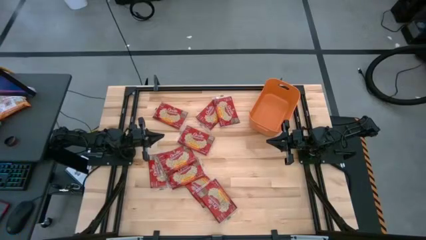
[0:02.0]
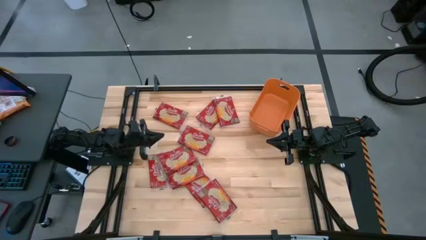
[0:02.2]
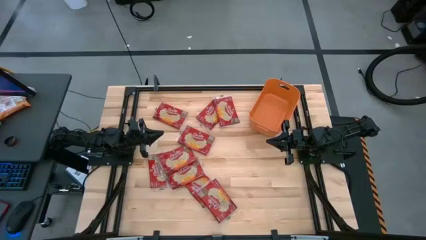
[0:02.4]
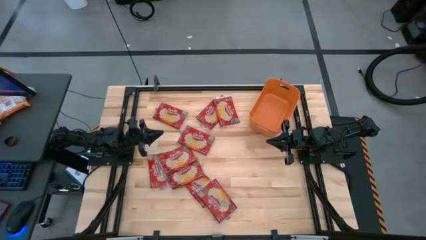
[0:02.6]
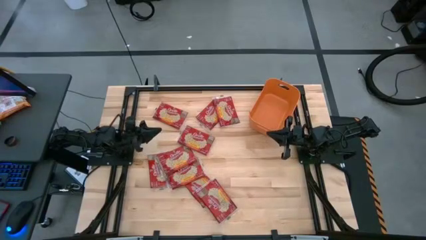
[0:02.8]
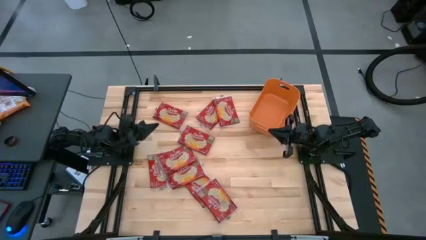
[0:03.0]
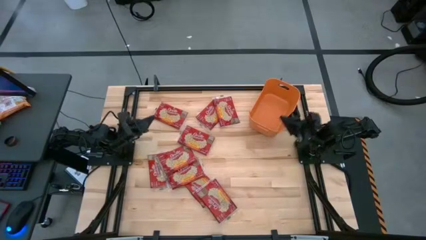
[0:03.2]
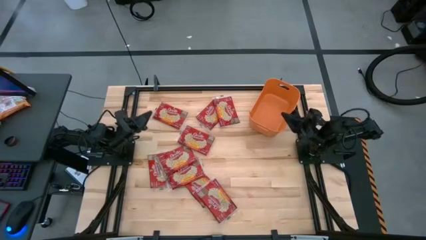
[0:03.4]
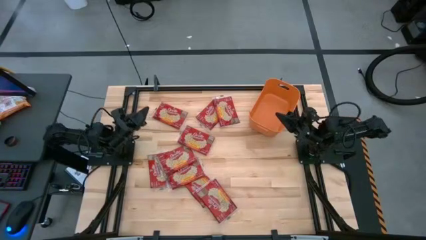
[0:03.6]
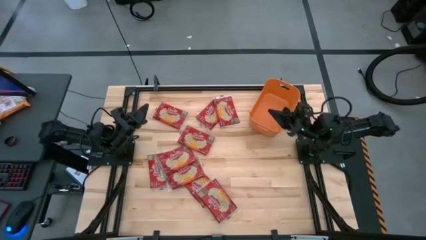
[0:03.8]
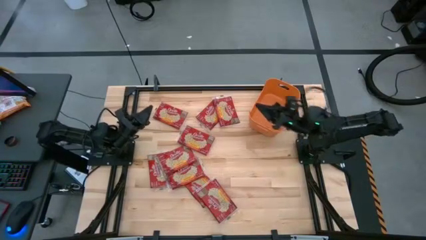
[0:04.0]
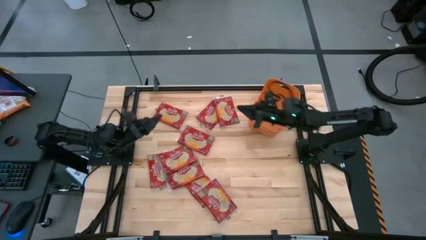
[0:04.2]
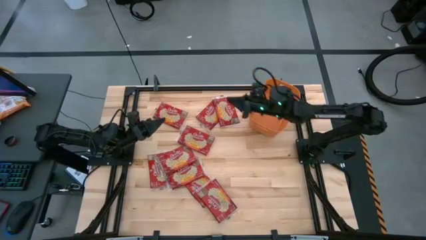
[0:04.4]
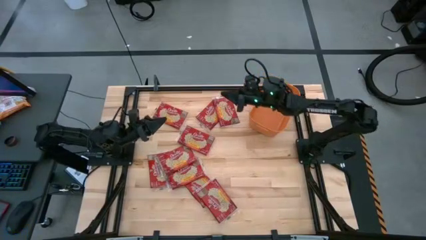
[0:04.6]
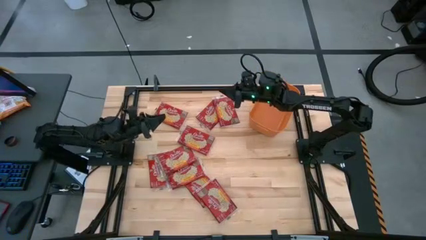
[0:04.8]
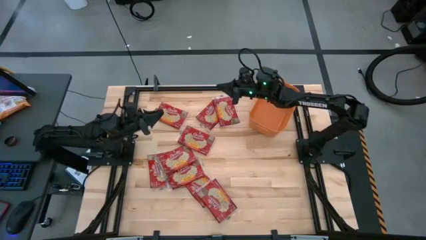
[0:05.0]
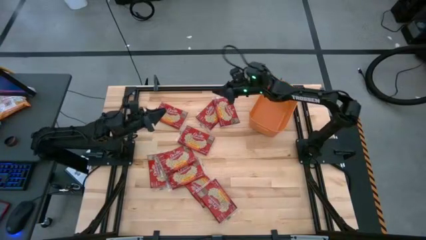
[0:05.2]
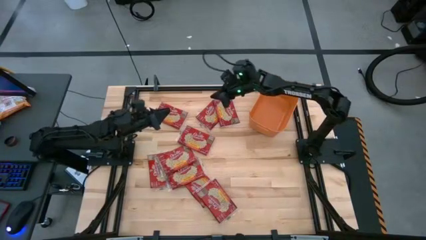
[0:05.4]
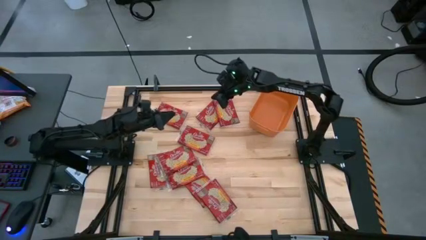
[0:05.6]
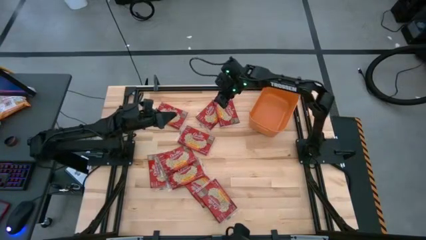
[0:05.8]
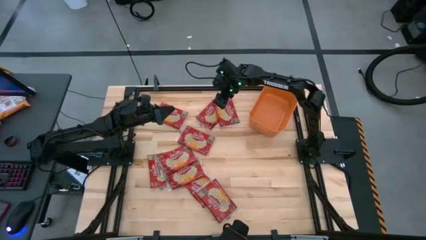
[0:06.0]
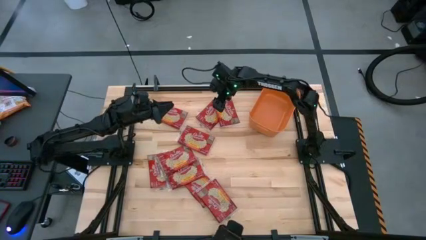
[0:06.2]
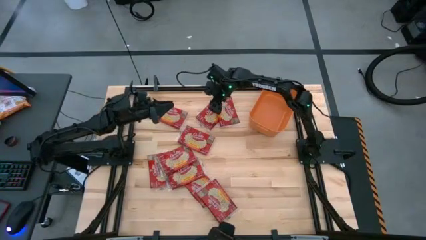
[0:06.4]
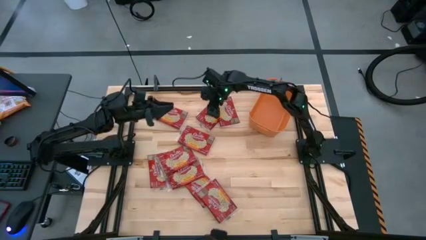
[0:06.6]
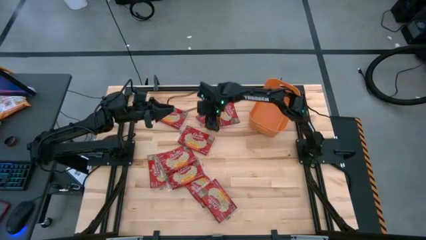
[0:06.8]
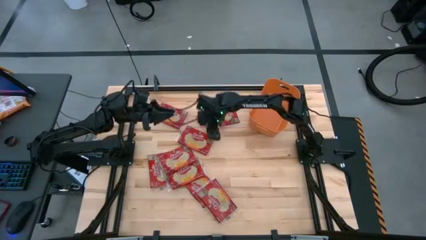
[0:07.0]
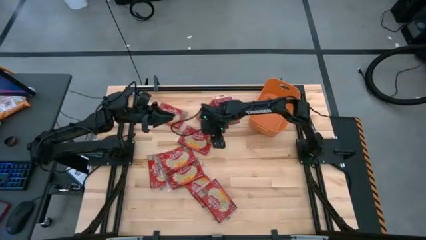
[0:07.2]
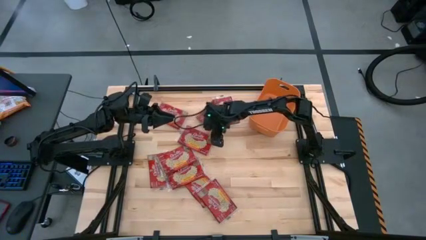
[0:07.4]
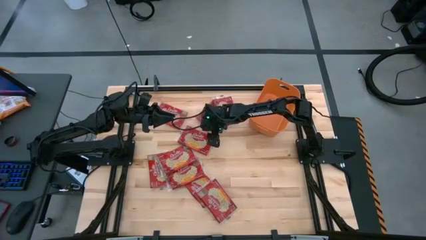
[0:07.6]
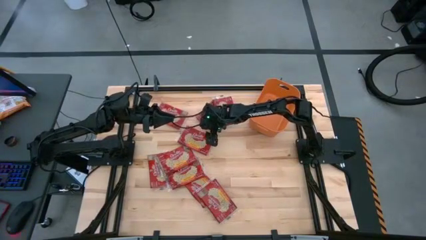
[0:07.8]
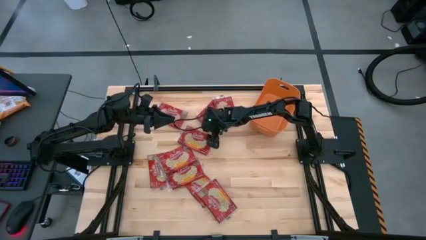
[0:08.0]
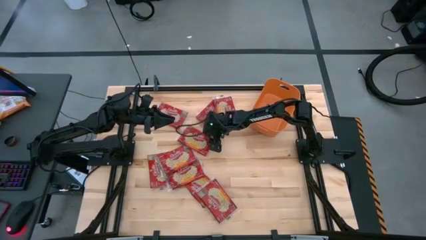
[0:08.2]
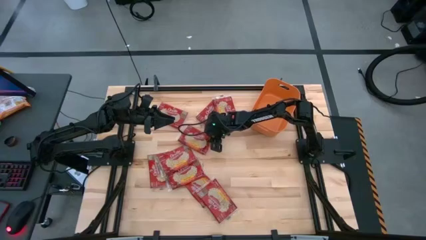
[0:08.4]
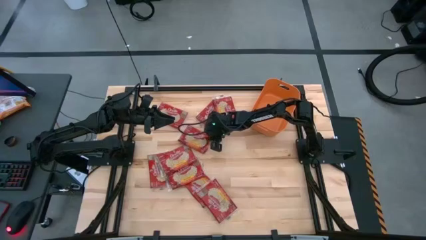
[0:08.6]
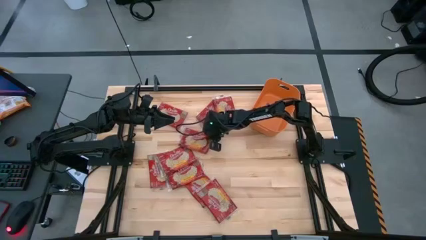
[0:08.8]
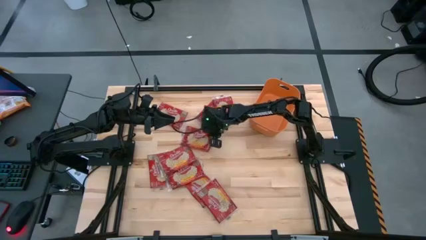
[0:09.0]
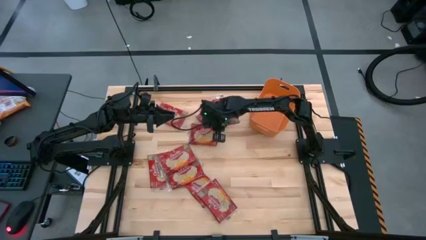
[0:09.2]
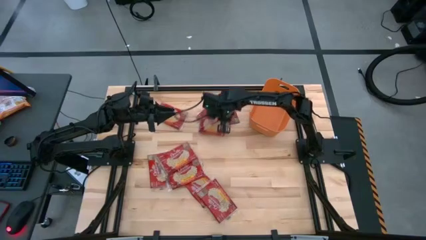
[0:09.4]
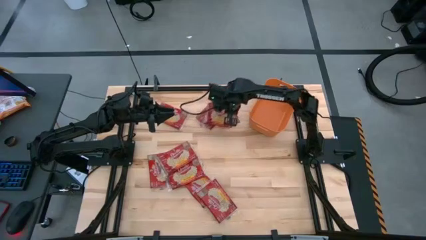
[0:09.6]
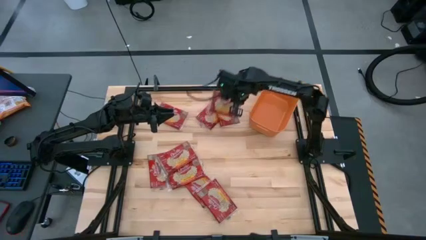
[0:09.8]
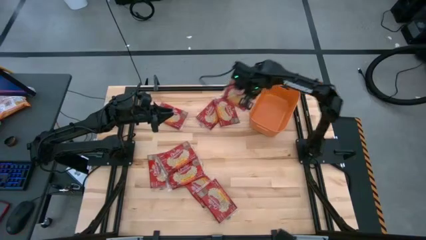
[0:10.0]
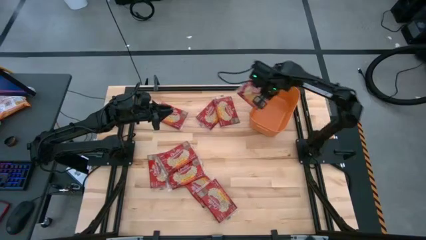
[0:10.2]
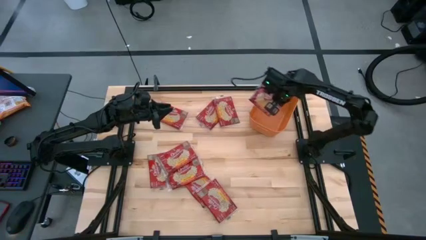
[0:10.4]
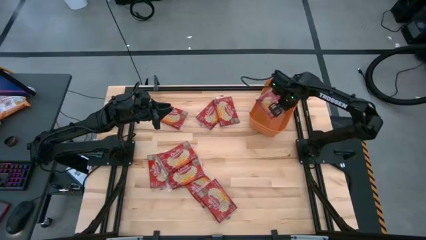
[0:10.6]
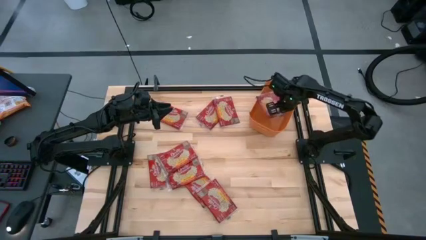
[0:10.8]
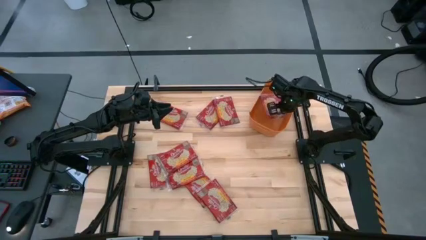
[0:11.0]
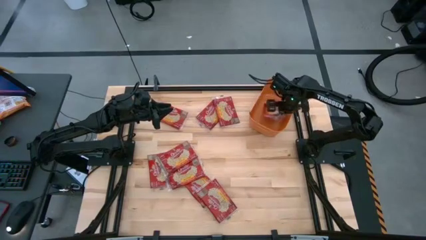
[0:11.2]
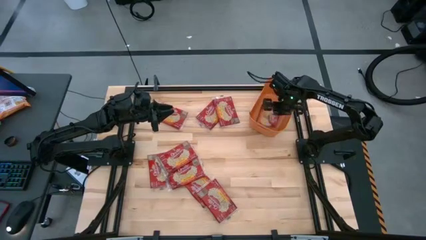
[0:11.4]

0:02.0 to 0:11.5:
Task: Sort popcorn bags into baskets
Stack the red popcorn on the orange bin

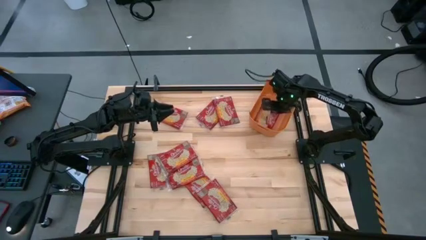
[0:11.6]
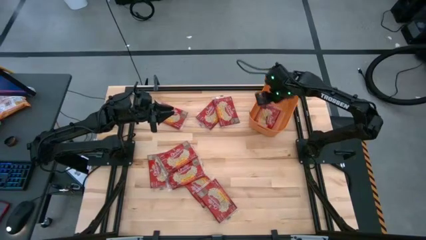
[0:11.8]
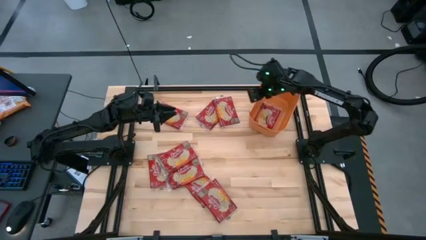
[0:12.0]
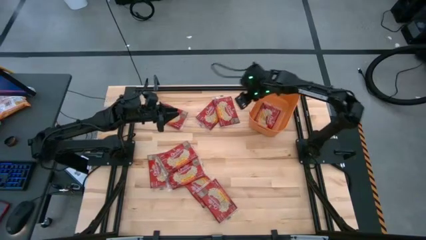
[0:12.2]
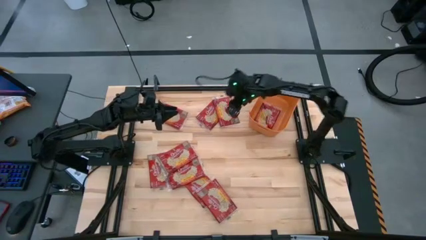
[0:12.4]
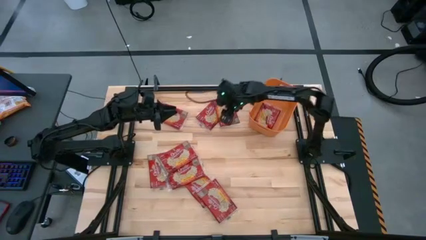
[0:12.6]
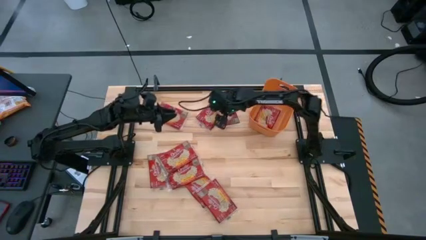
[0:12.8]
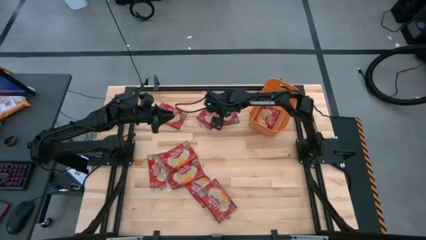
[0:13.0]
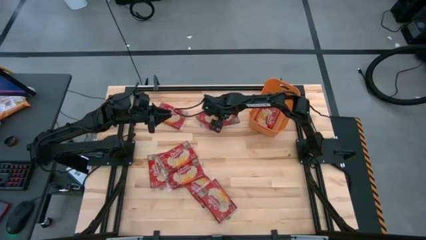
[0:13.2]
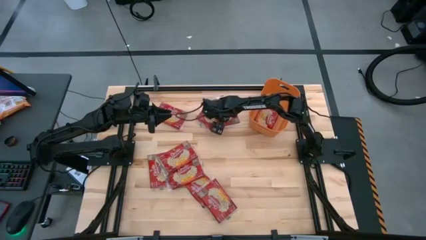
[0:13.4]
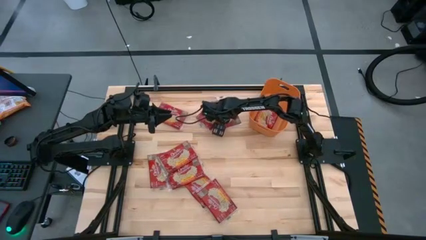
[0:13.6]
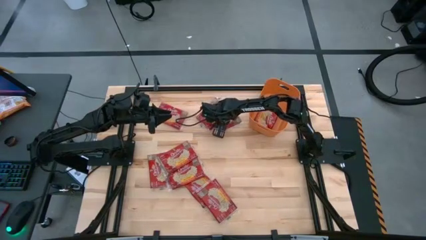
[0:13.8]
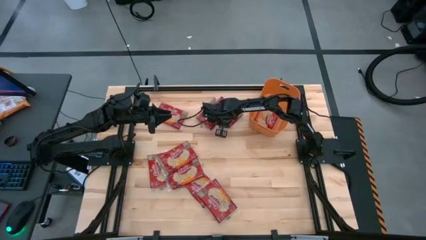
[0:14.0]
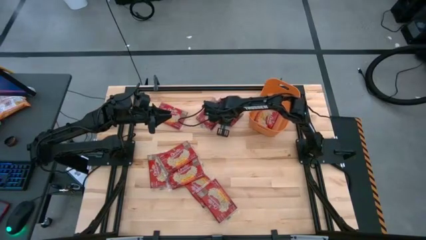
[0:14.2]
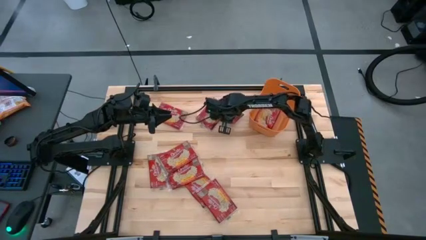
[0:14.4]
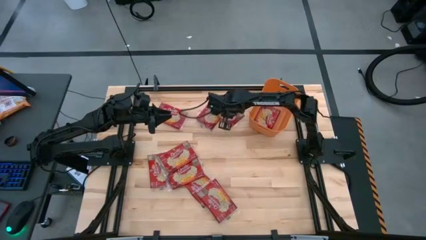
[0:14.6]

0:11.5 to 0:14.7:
Stack the red popcorn on the orange bin

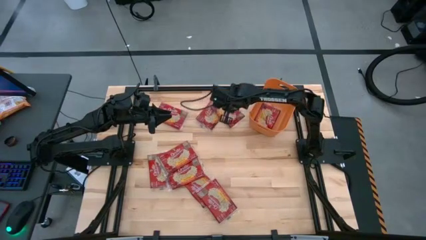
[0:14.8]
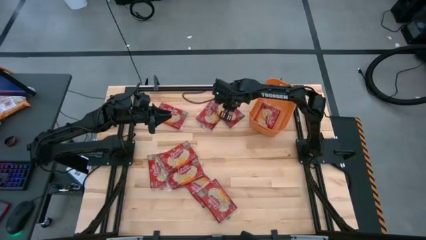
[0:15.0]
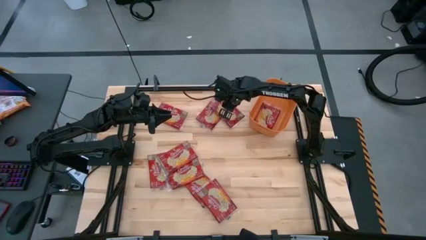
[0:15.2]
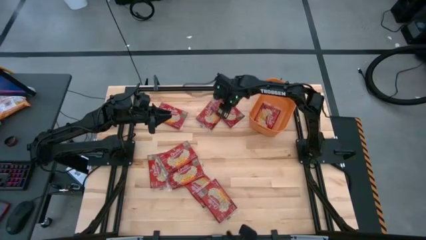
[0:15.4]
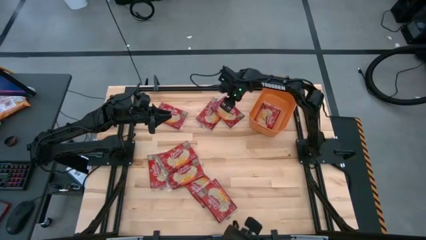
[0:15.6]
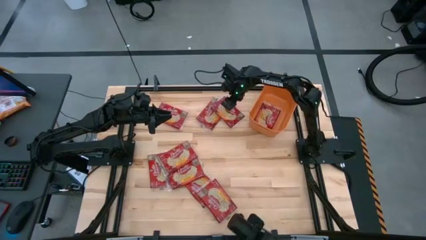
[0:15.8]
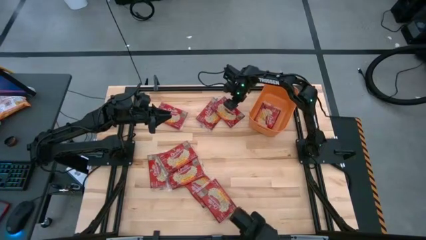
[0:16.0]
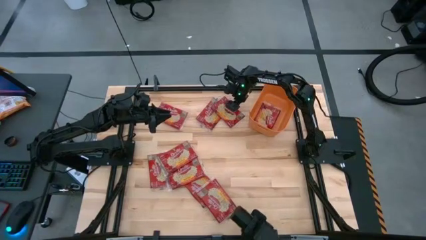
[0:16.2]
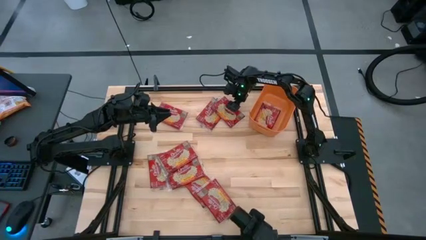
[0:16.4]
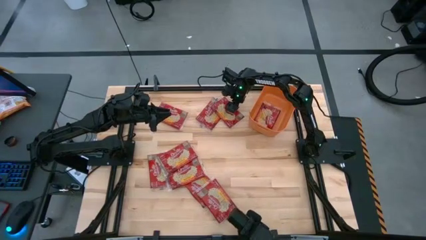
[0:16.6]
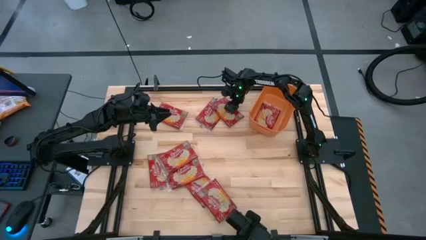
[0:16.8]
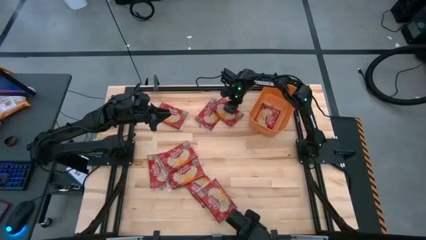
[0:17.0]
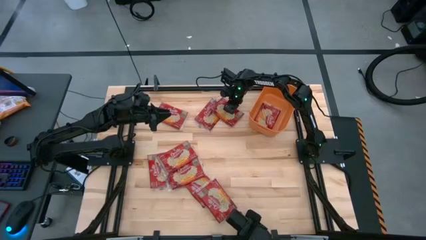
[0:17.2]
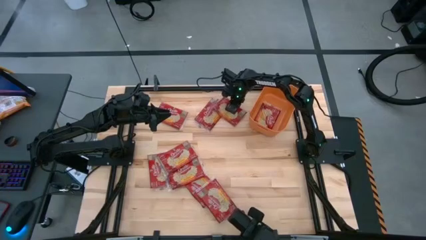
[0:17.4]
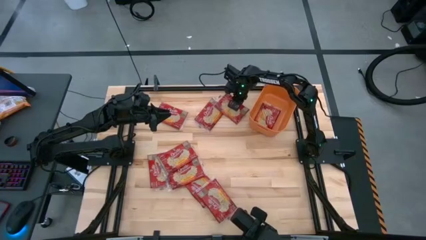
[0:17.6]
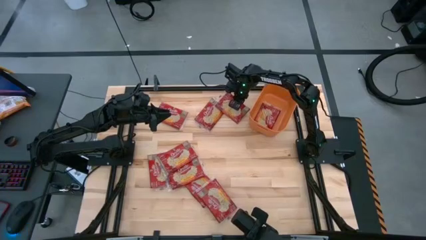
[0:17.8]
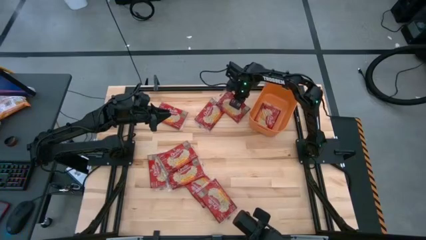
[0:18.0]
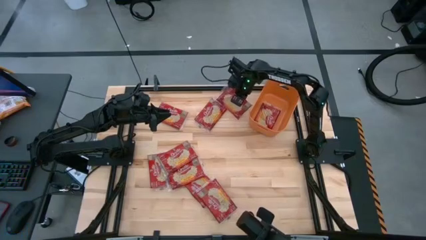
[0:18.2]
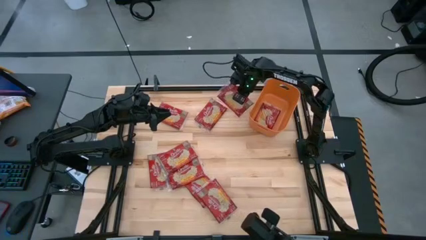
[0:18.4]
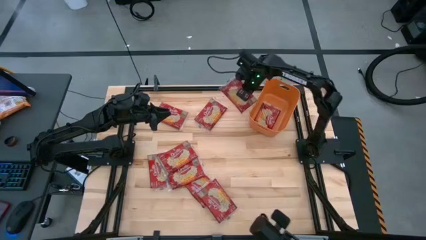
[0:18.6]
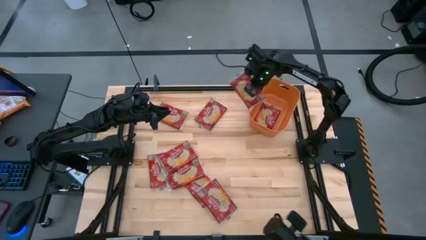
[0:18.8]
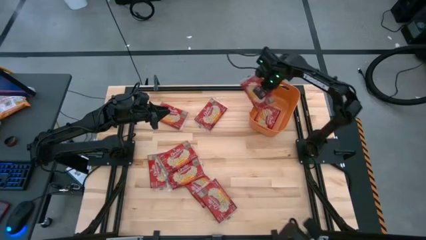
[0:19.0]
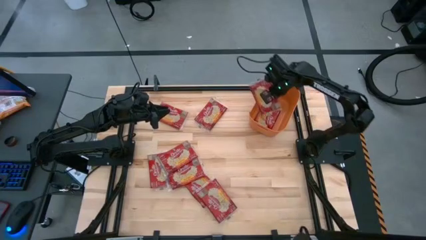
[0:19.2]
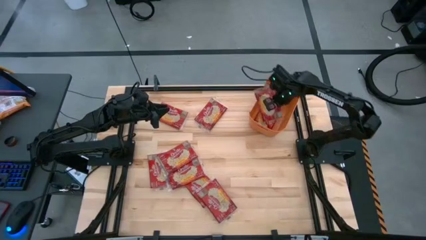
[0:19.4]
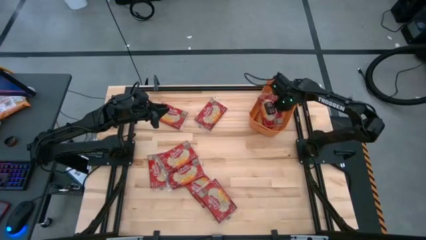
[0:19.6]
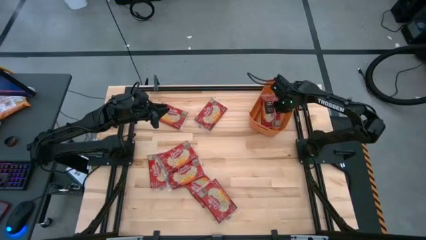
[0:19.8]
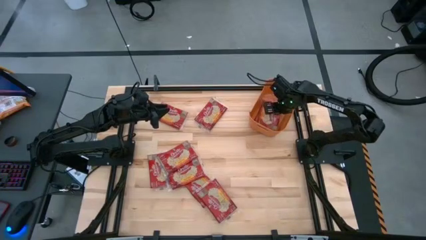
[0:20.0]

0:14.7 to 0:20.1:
Stack the red popcorn on the orange bin
